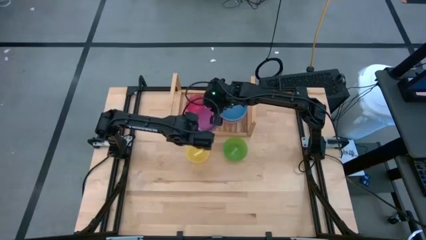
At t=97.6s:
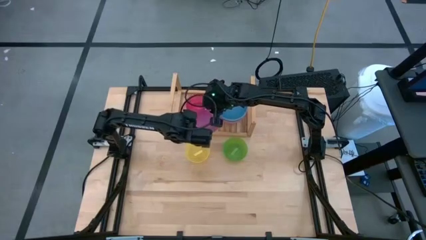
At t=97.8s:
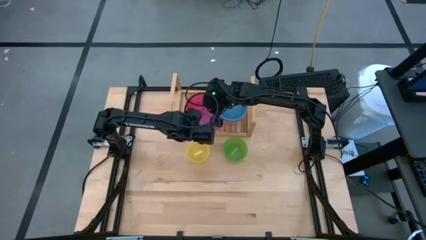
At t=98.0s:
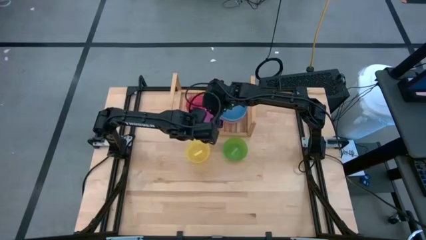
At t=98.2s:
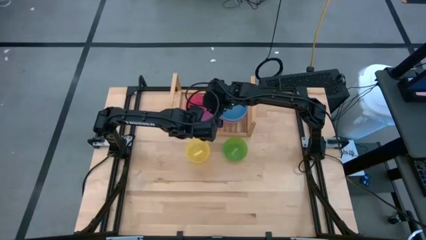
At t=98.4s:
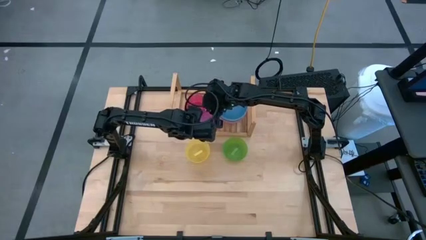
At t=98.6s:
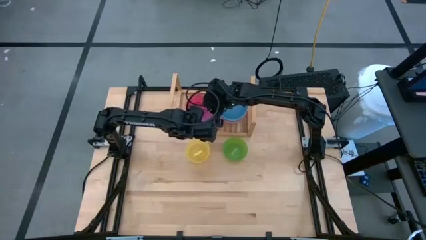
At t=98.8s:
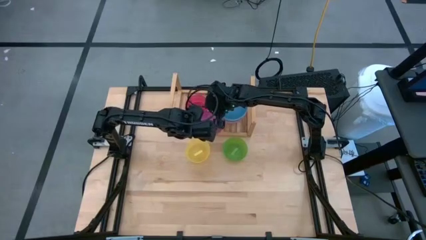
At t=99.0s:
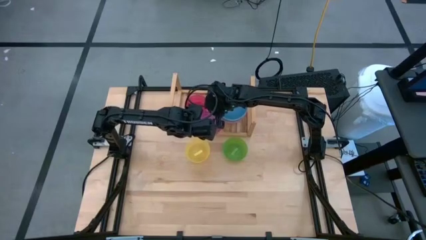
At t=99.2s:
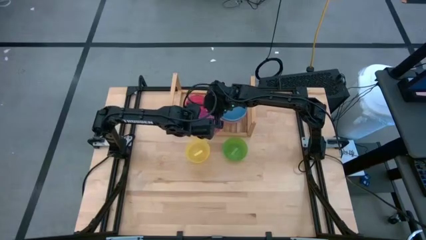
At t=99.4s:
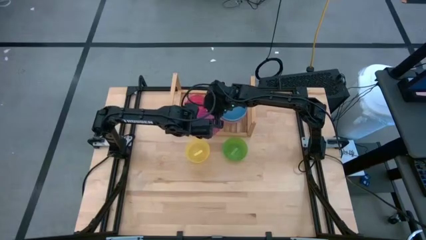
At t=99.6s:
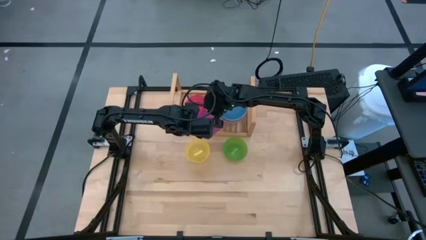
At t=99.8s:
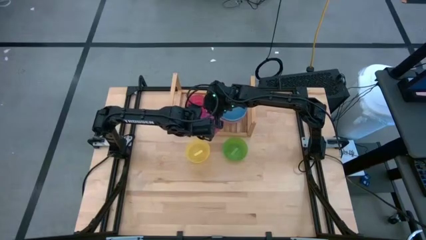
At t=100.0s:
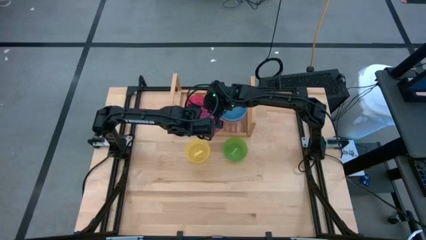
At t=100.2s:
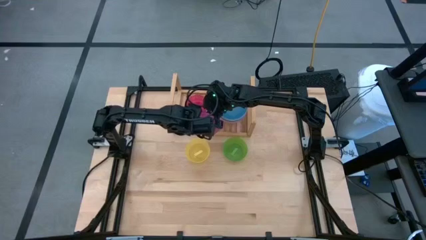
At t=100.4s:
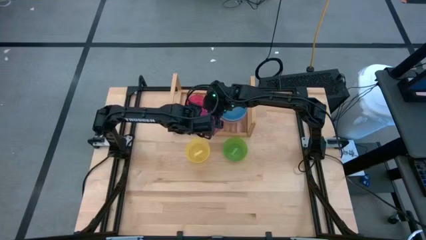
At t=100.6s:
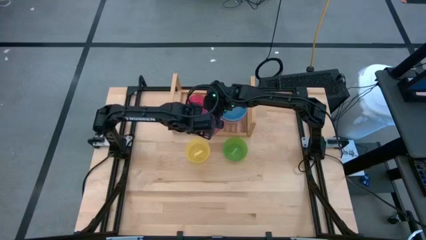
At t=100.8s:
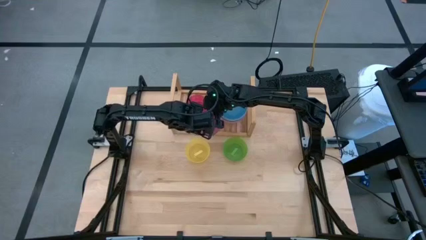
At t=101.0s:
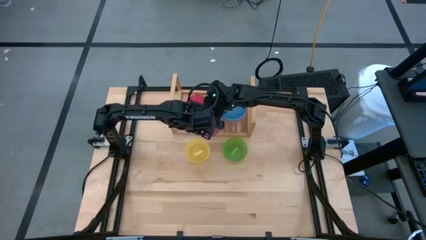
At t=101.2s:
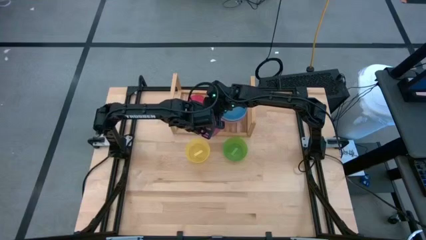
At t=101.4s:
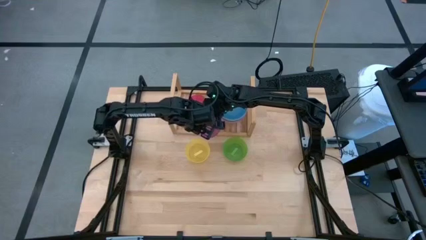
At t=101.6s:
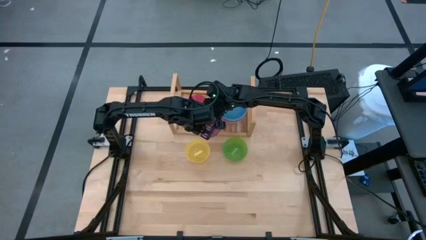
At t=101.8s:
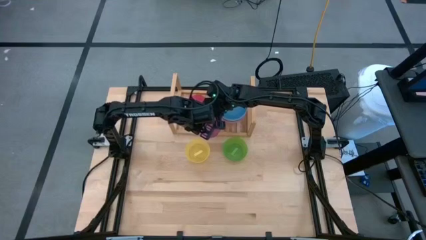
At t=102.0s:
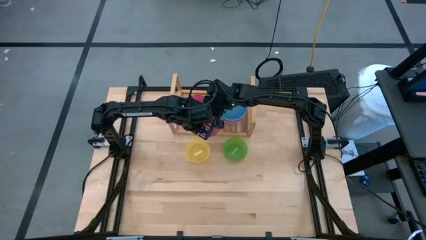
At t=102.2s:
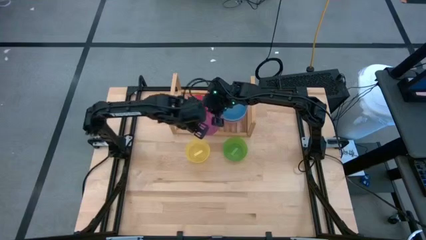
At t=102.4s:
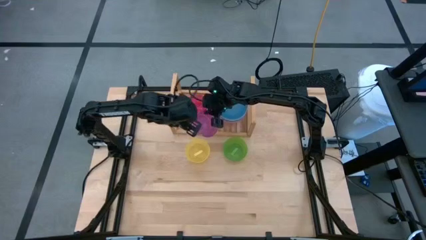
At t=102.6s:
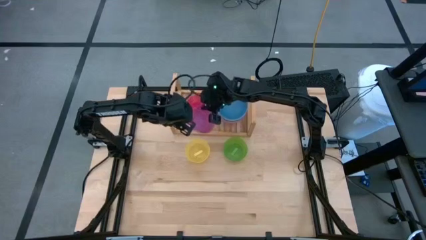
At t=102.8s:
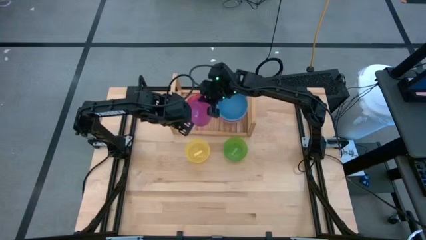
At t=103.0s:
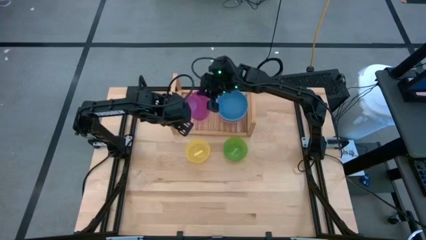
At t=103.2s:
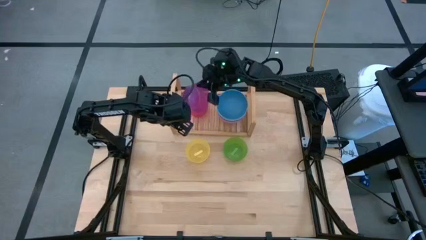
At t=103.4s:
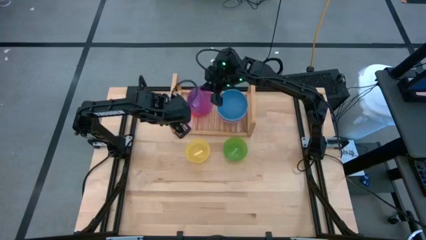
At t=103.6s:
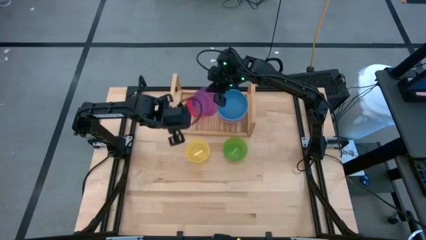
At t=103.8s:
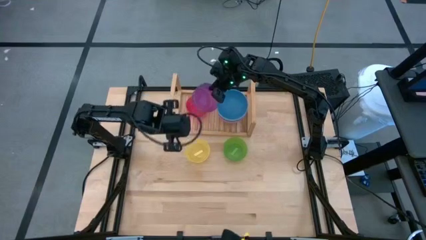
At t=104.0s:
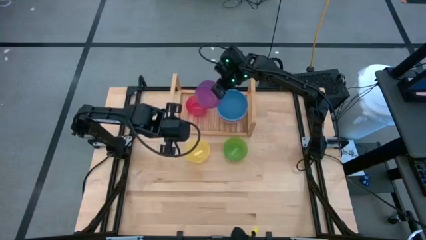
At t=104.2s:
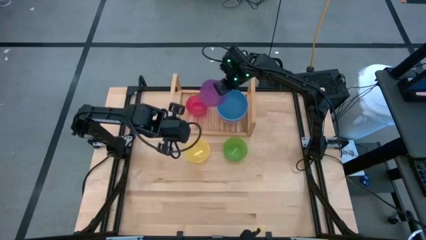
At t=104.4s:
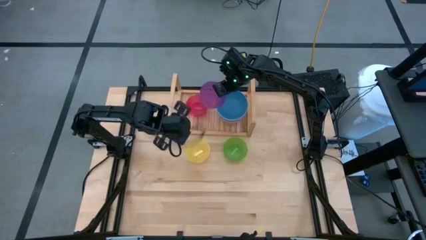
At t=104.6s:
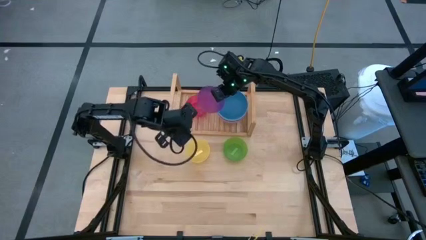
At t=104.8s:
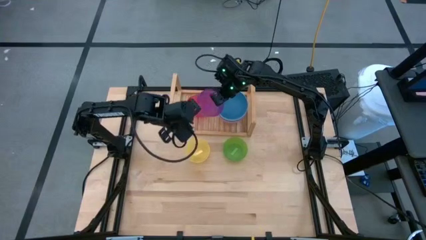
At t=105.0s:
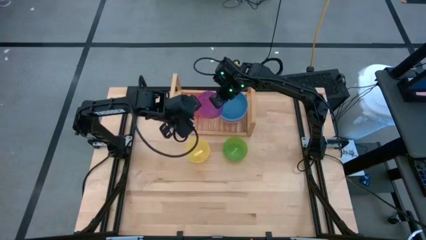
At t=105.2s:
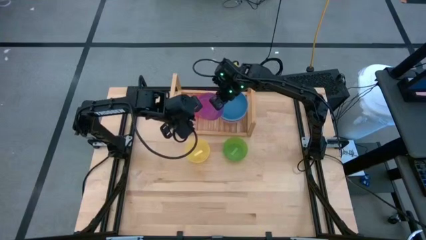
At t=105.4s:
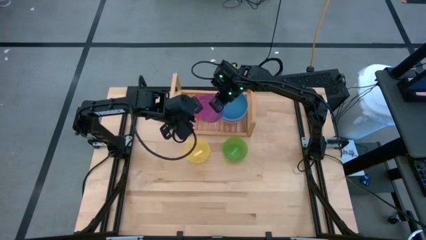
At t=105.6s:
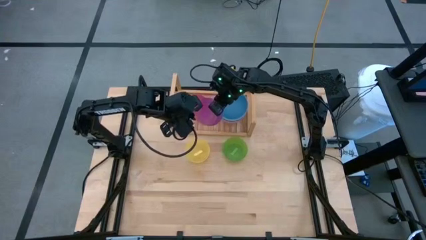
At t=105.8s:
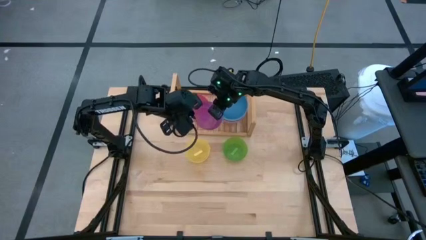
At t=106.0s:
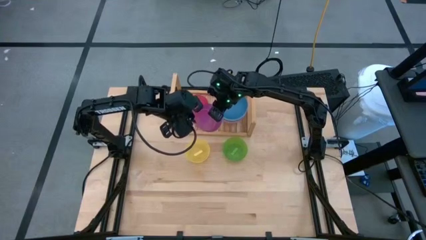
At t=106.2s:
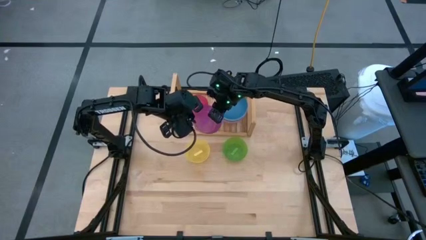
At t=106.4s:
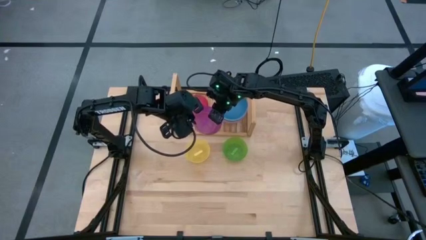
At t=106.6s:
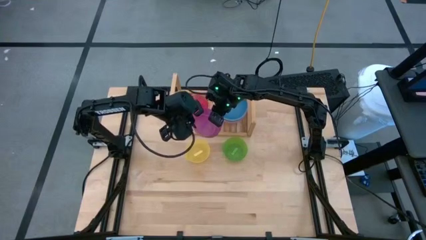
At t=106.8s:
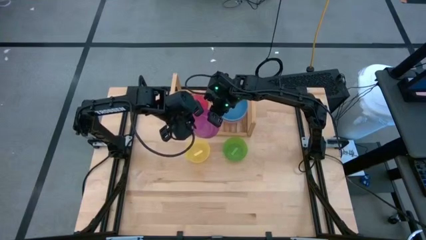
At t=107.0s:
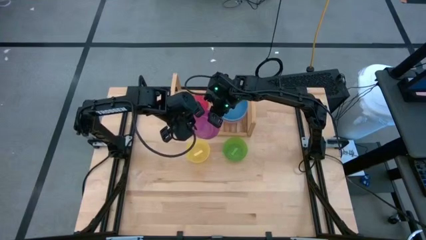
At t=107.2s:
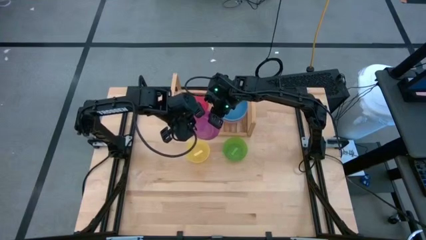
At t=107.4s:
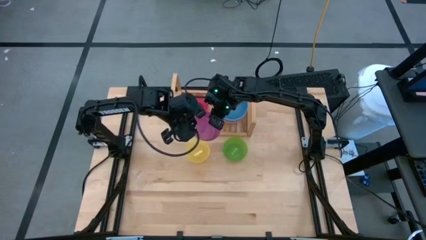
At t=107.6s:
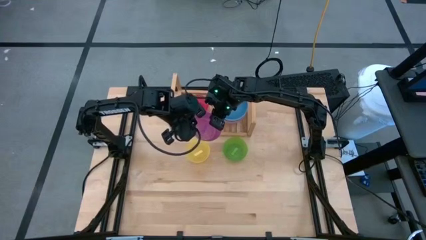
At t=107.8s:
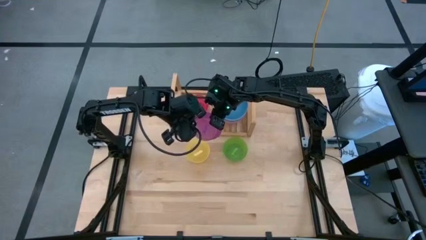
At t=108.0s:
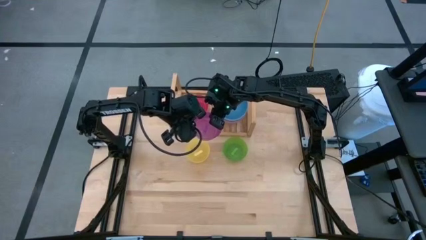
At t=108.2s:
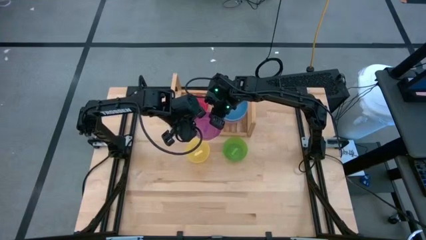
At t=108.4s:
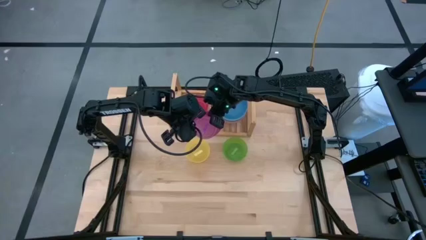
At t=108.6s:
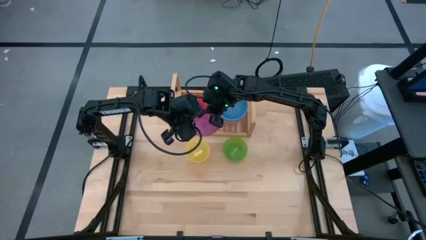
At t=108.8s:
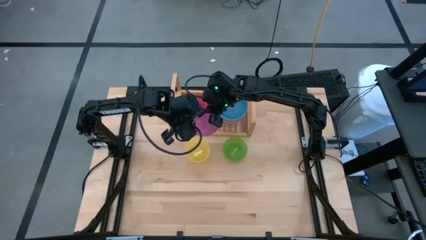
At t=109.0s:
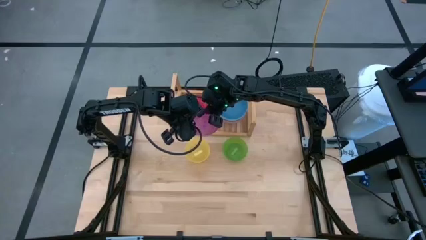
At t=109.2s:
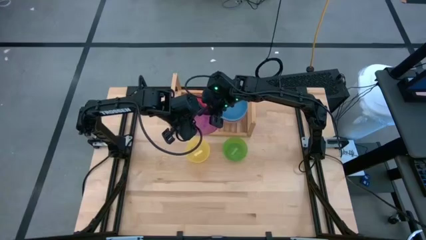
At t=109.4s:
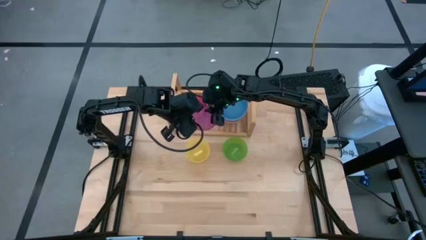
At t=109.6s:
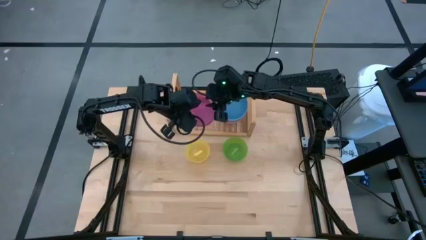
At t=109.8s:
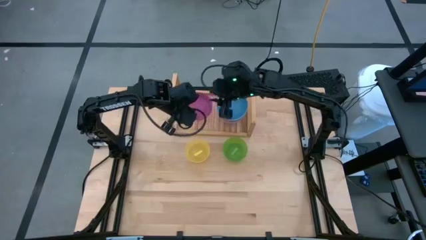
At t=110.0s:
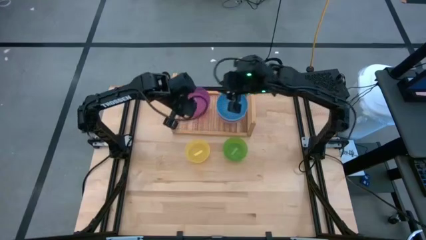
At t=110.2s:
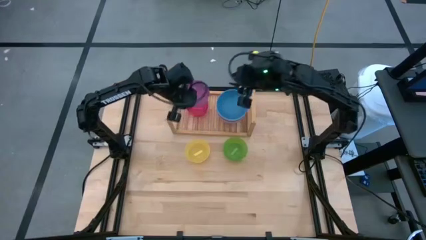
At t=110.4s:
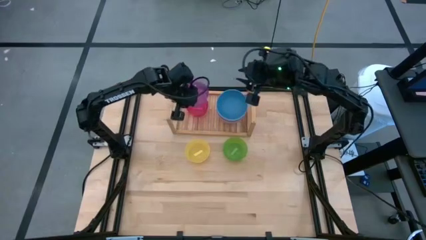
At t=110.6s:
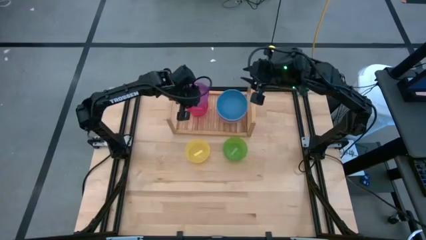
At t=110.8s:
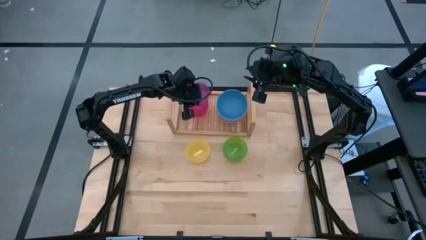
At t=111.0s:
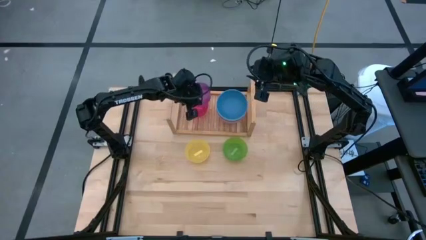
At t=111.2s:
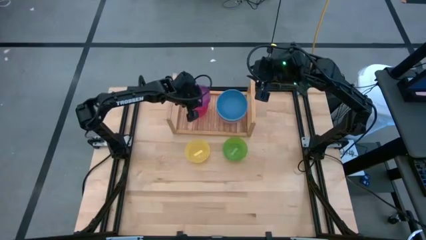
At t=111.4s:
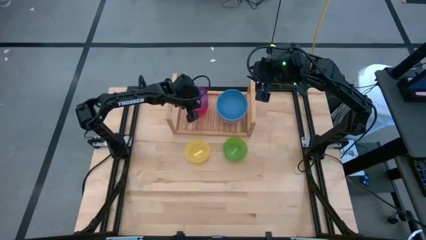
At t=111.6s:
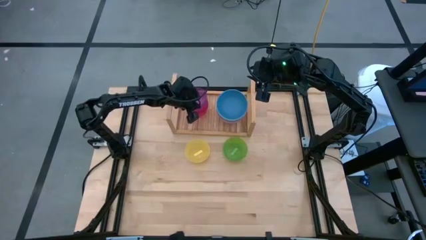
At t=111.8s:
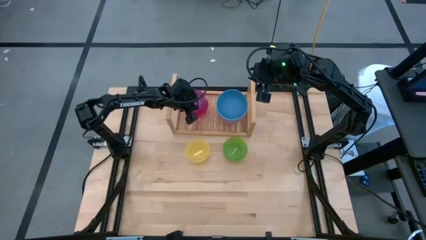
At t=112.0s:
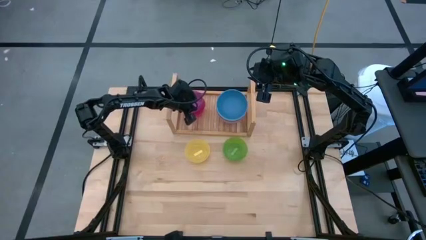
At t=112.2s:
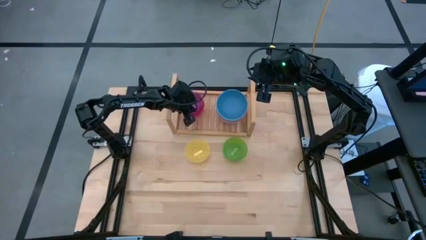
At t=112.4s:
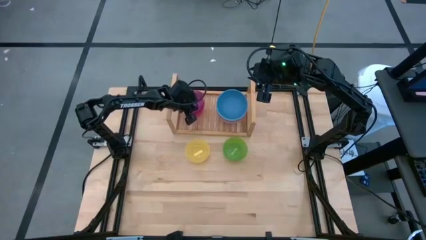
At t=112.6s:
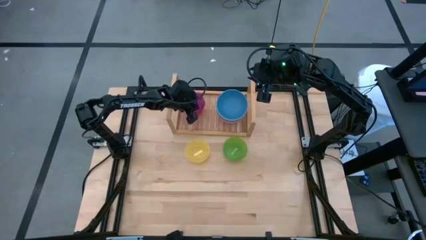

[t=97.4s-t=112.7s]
Task: Place and stack bowls onto a shelf
Stack the violet bowl into the red bowl on the shelf
